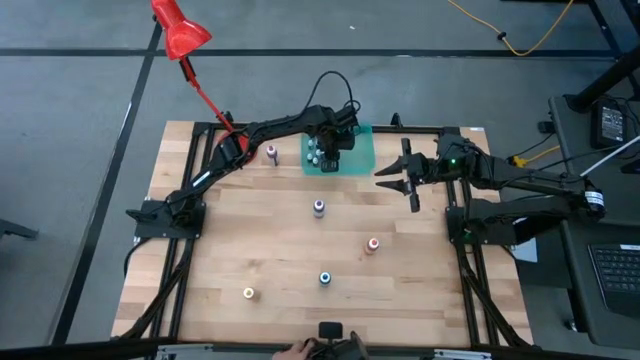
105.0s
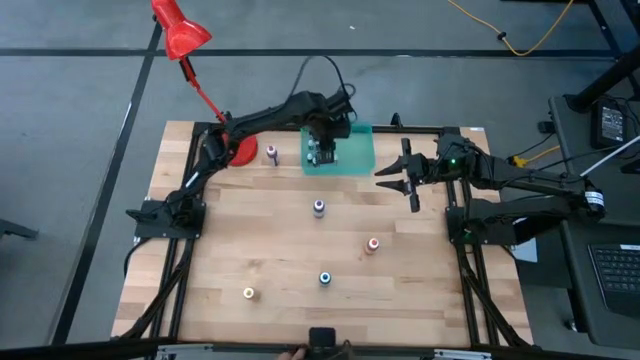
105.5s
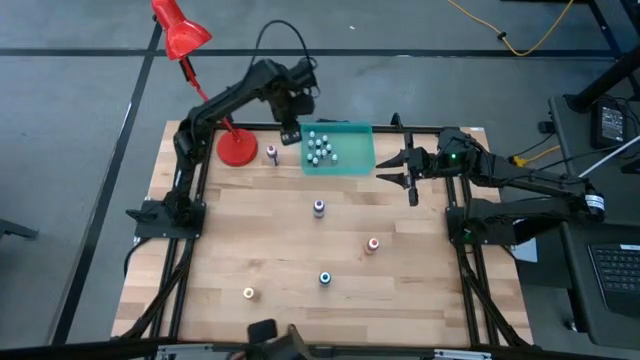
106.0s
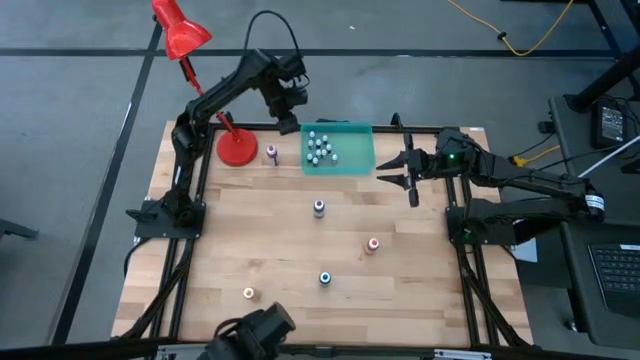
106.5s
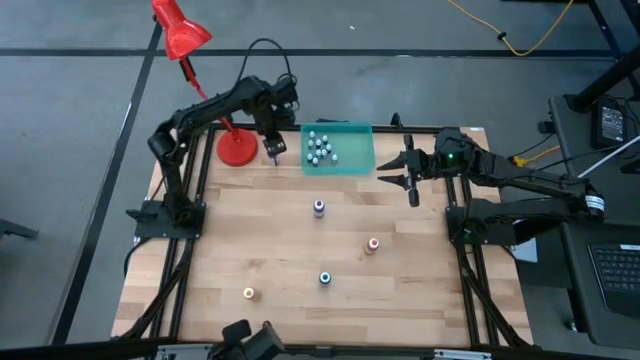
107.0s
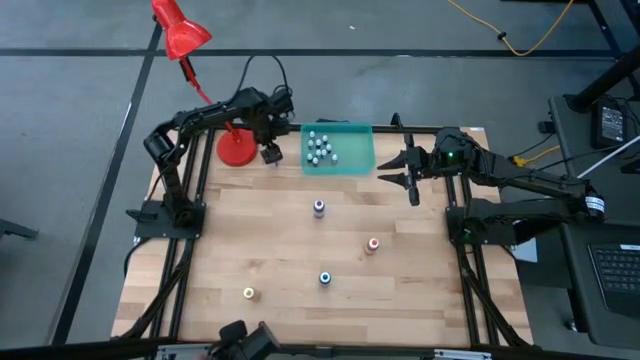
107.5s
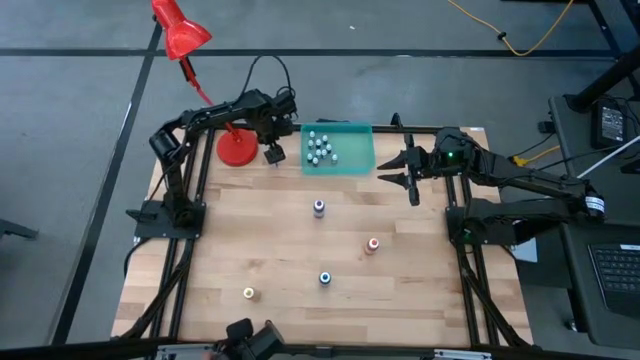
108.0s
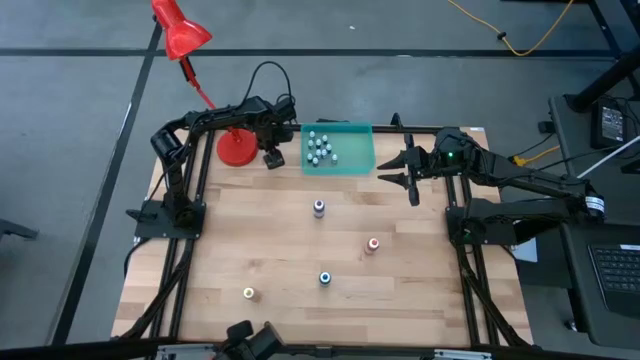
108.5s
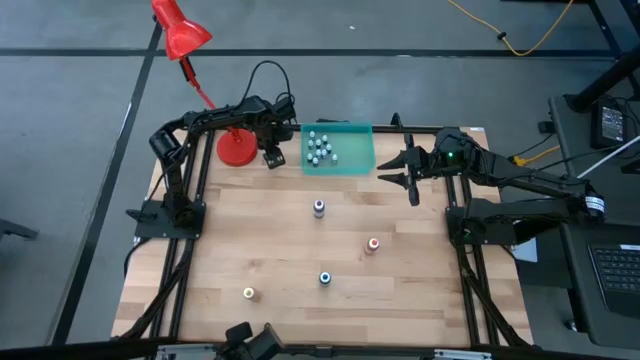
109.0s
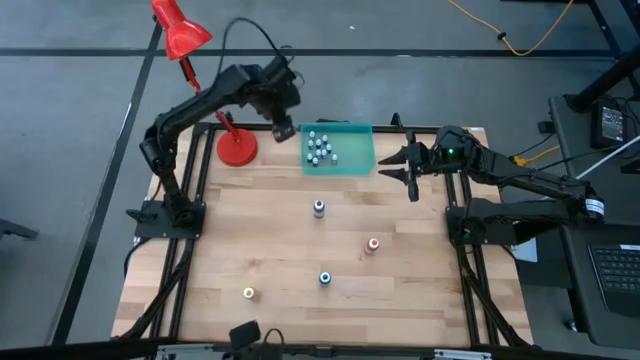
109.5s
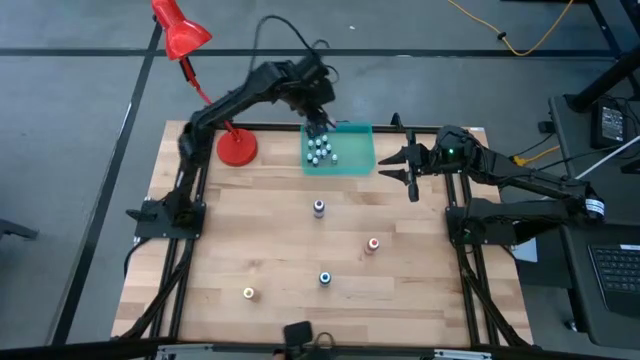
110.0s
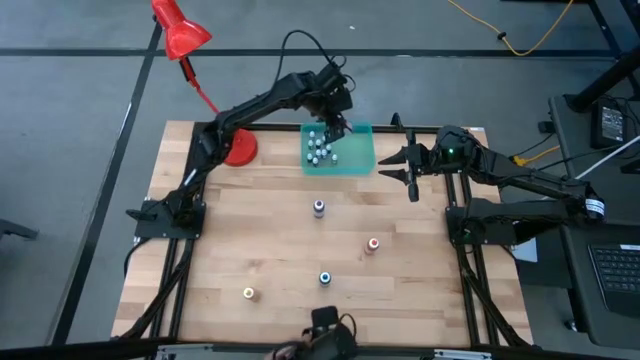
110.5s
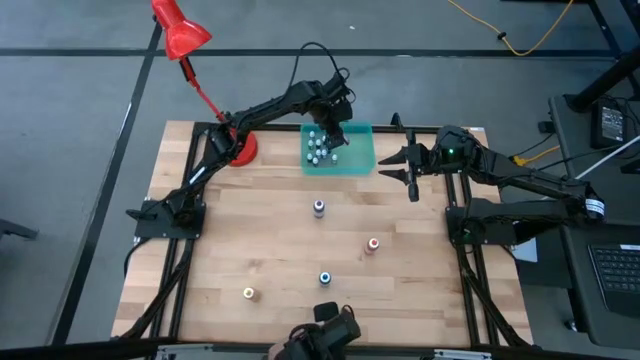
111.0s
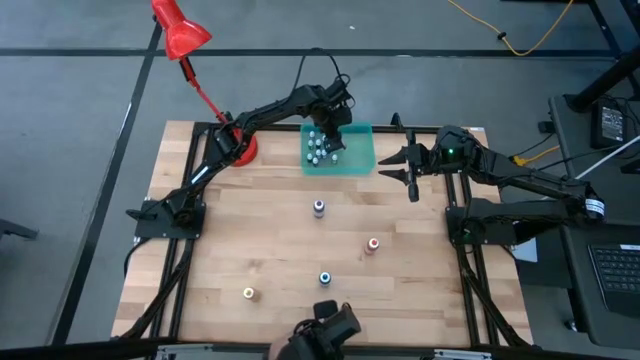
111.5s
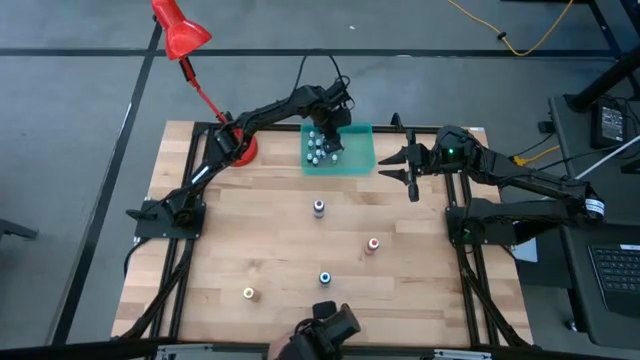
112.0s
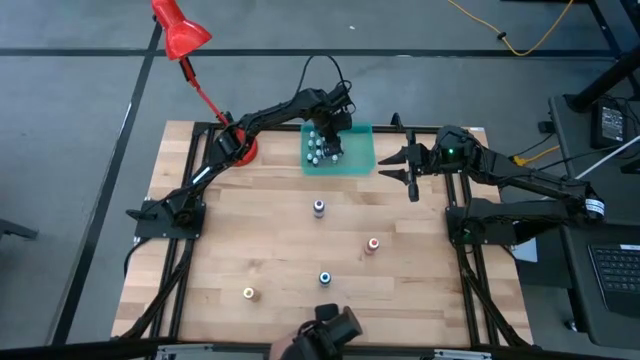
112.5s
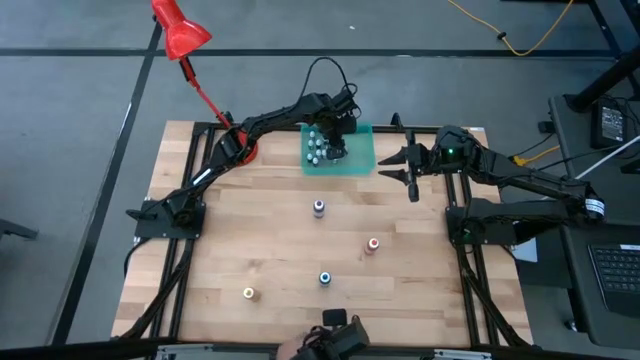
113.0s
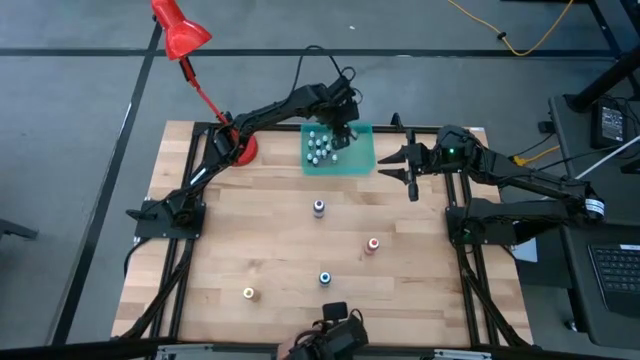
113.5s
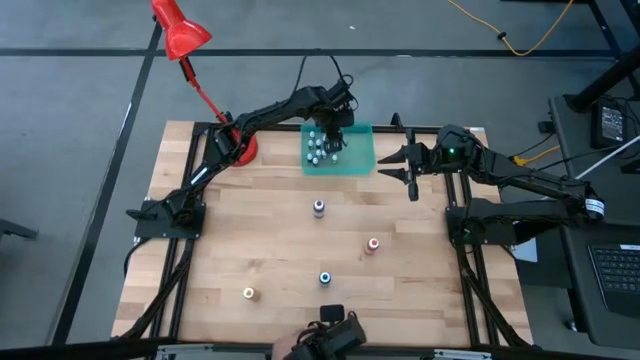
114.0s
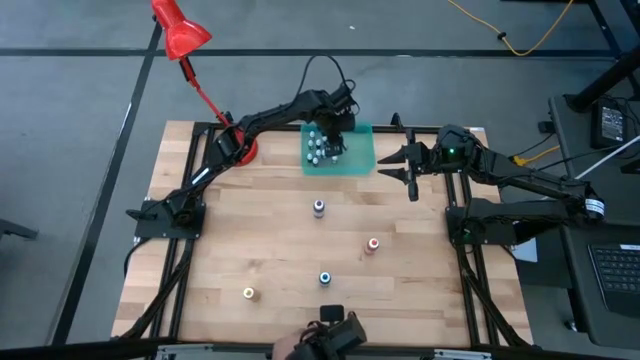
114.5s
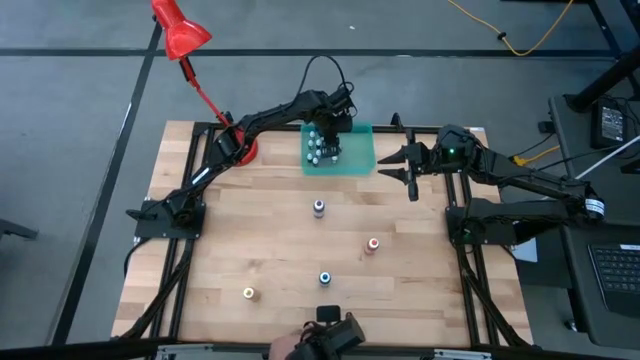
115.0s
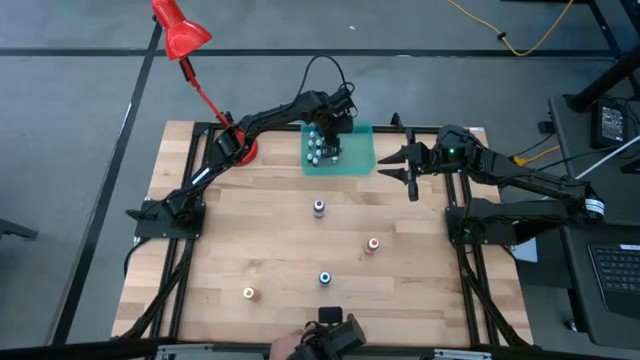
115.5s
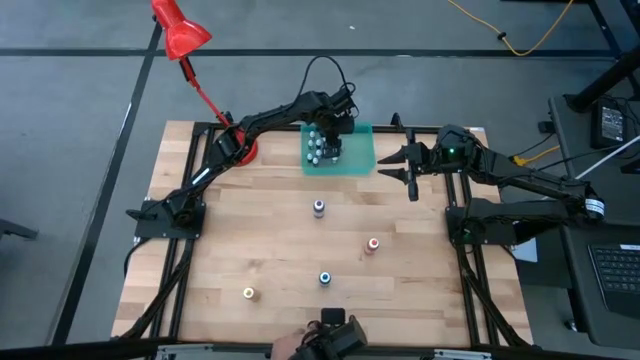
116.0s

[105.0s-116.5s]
Task: Pick & Place food coloring
Put the large pink food coloring bottle into the green bin

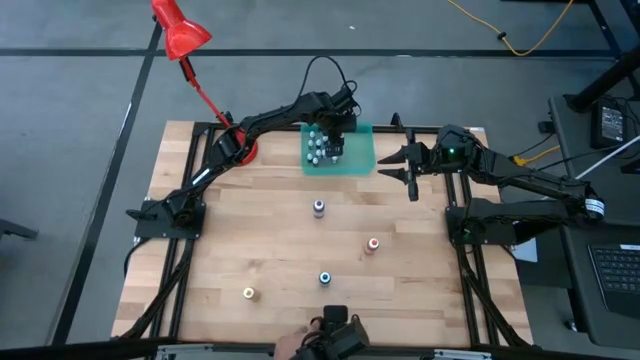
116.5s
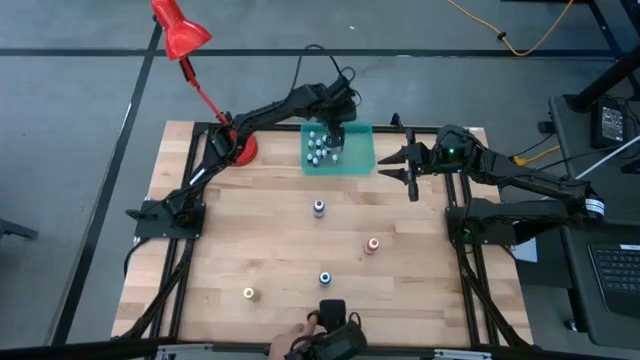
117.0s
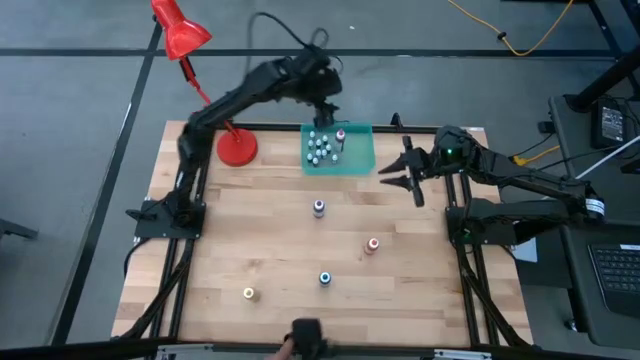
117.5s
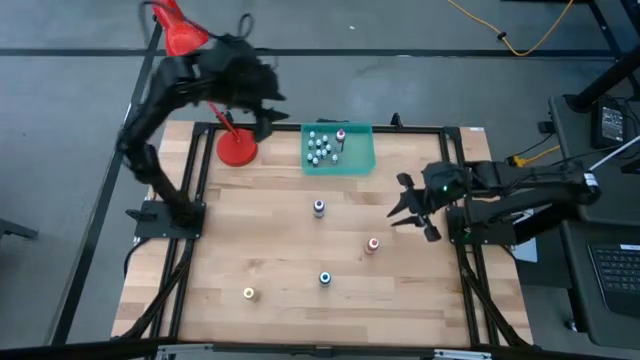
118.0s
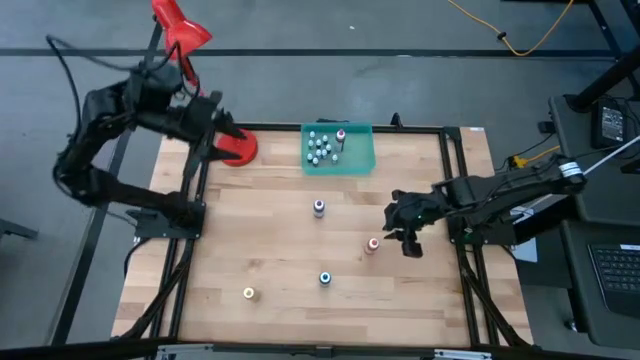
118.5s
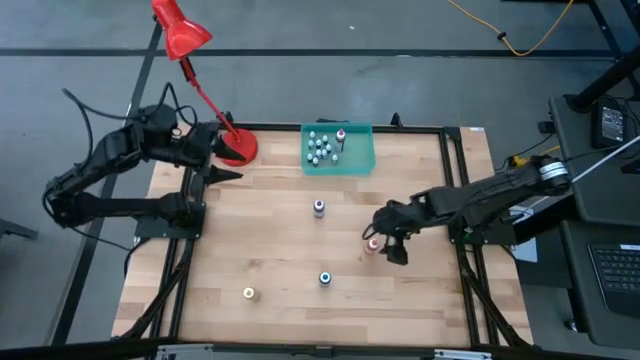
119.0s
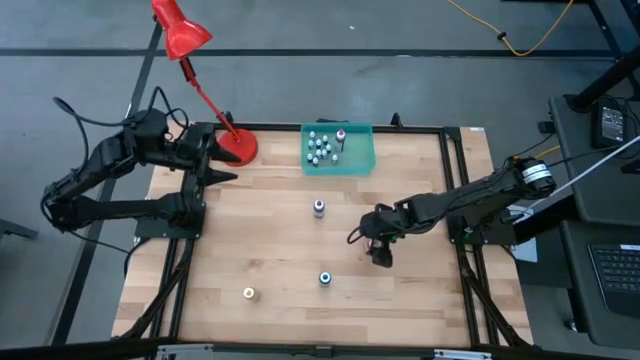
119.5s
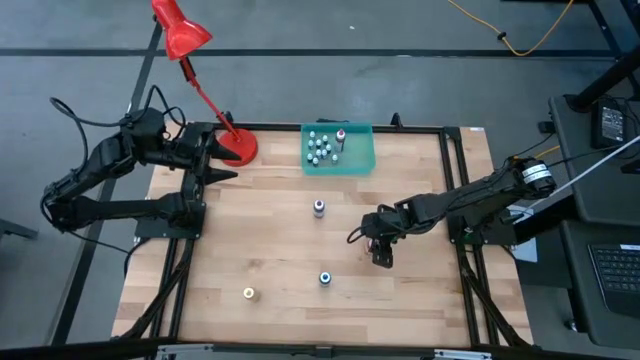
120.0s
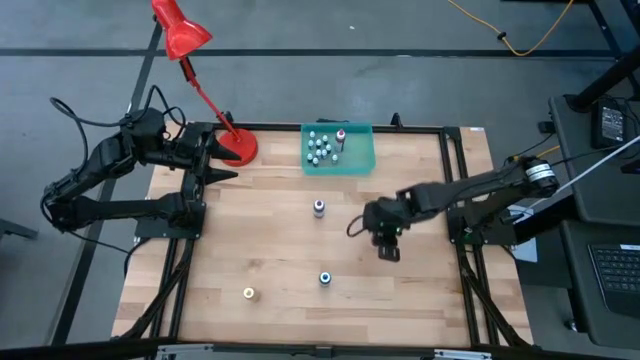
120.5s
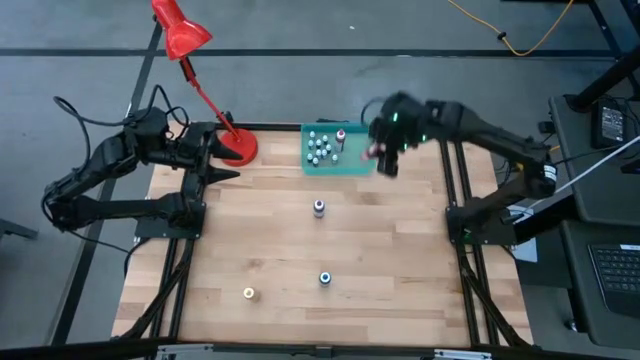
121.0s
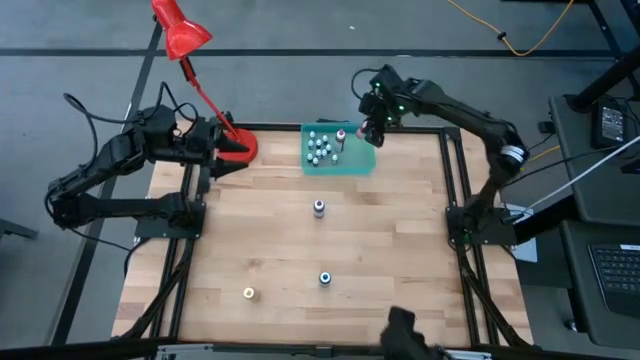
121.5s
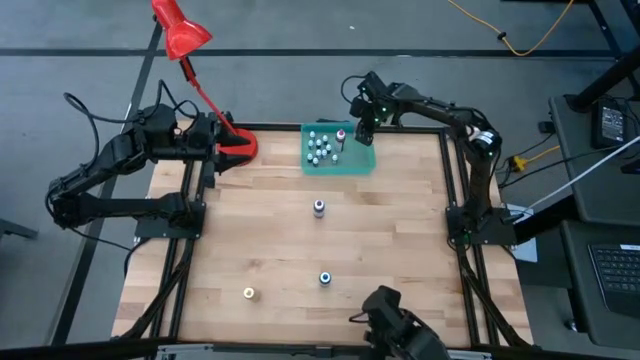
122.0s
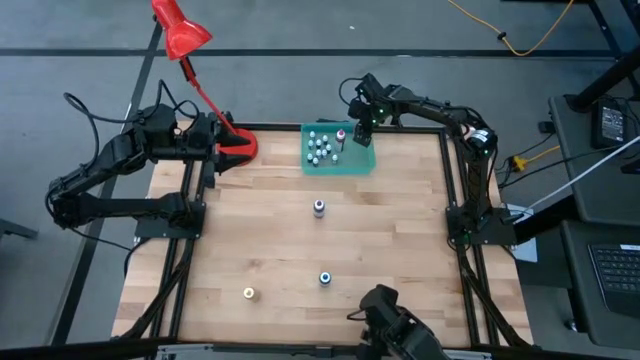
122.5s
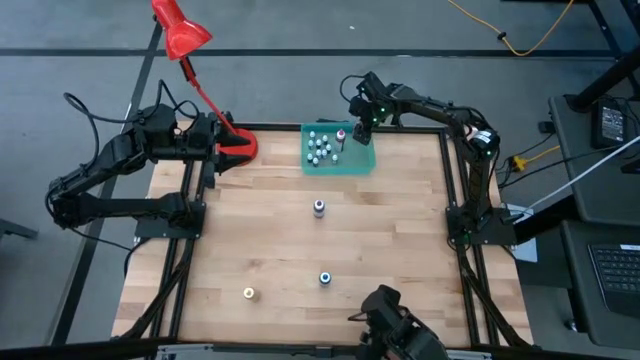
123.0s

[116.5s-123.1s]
Put the large orange food coloring bottle into the green bin

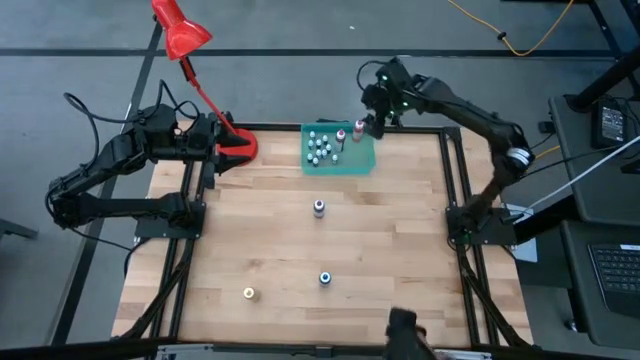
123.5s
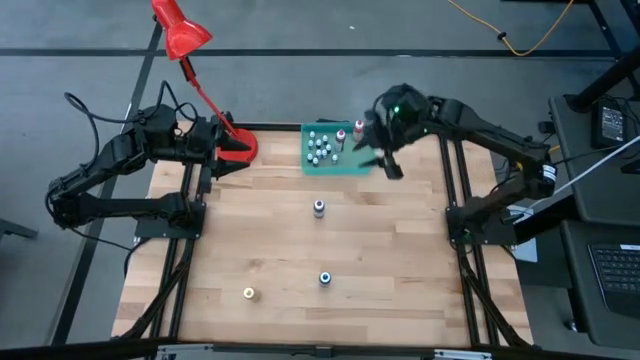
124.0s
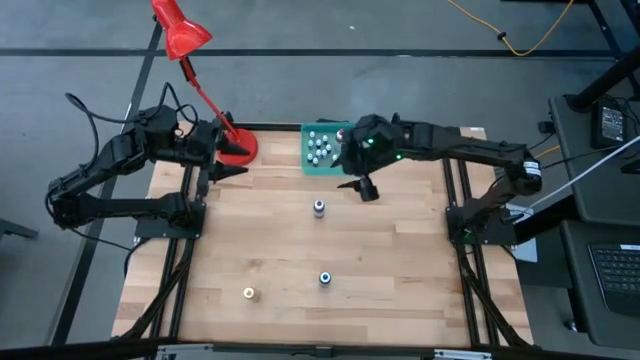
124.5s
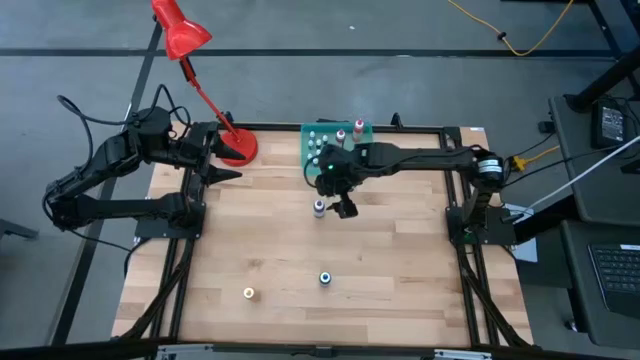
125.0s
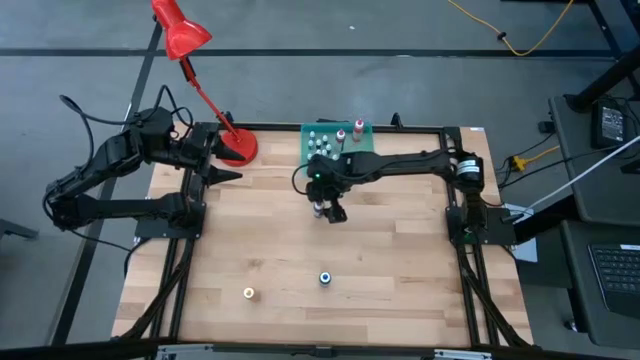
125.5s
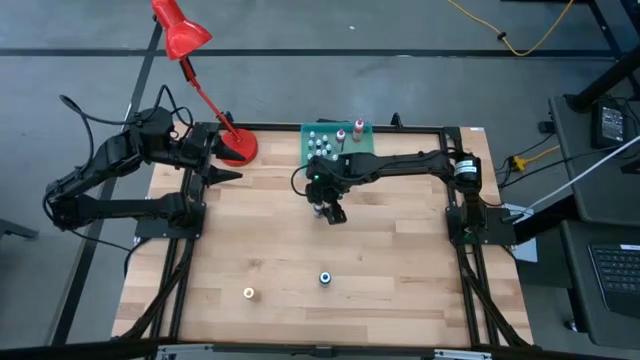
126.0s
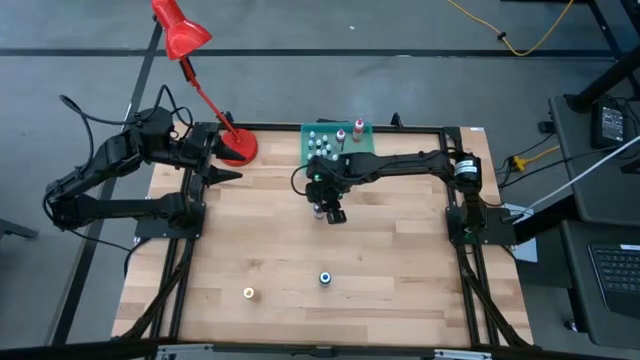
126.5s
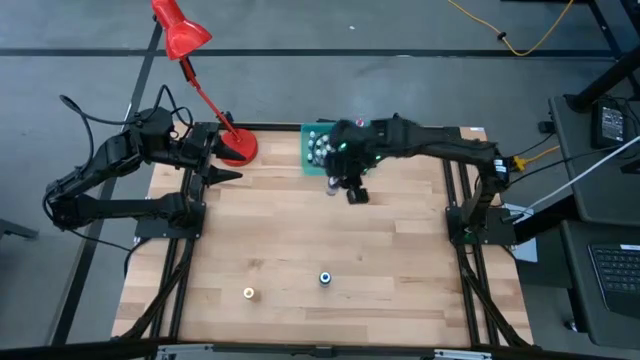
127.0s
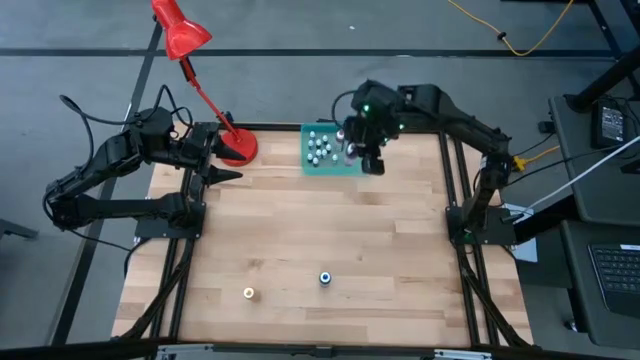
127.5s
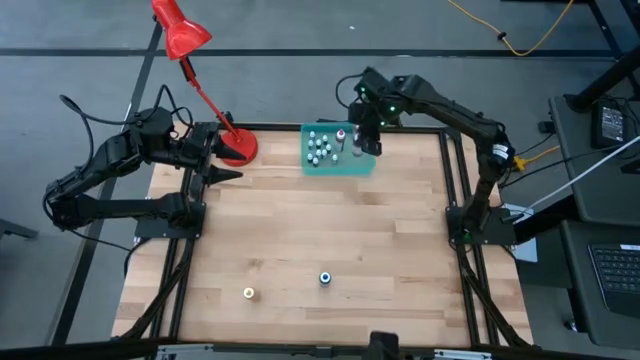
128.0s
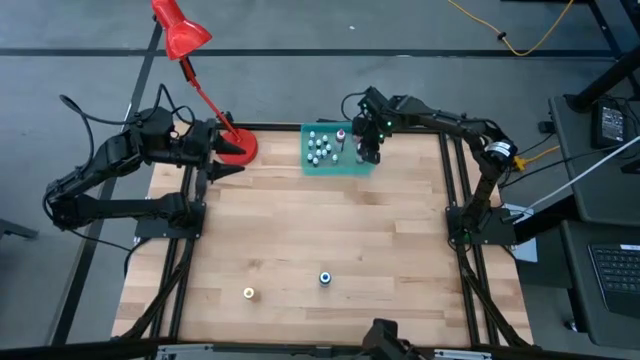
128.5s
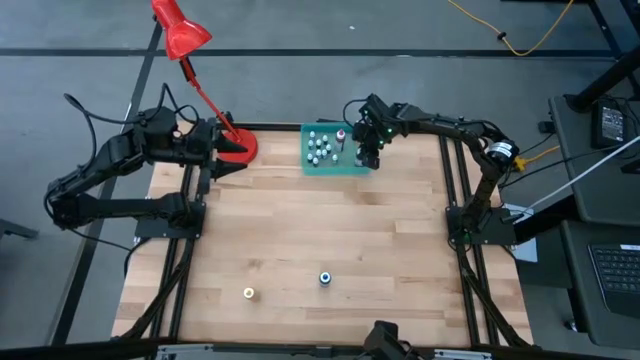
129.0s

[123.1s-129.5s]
Put the large purple food coloring bottle into the green bin
